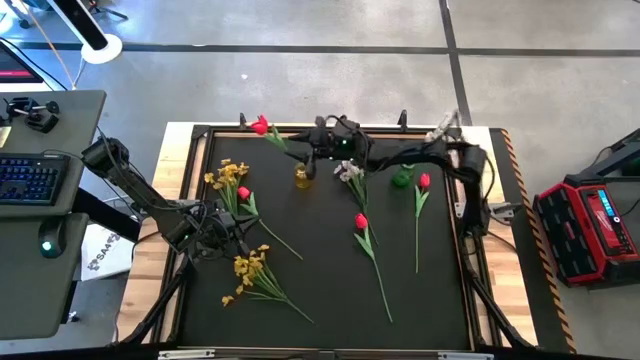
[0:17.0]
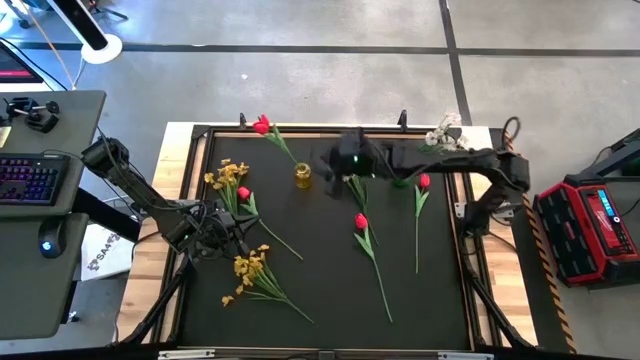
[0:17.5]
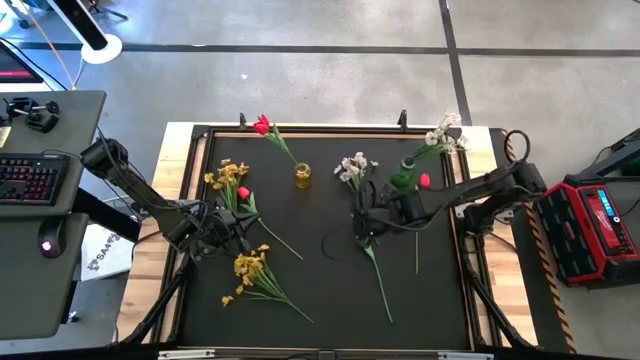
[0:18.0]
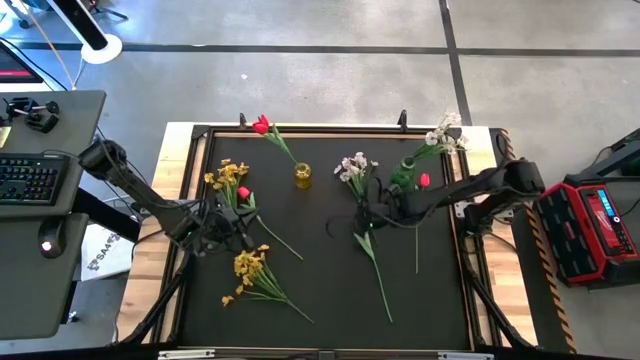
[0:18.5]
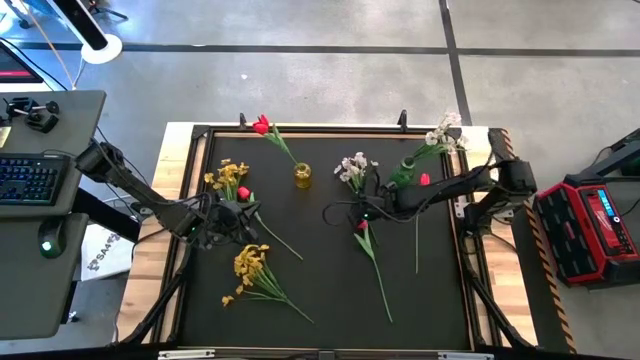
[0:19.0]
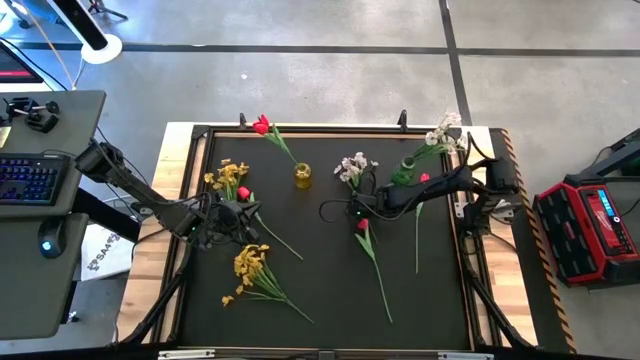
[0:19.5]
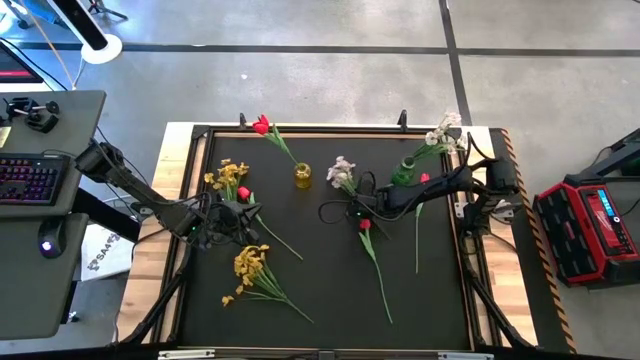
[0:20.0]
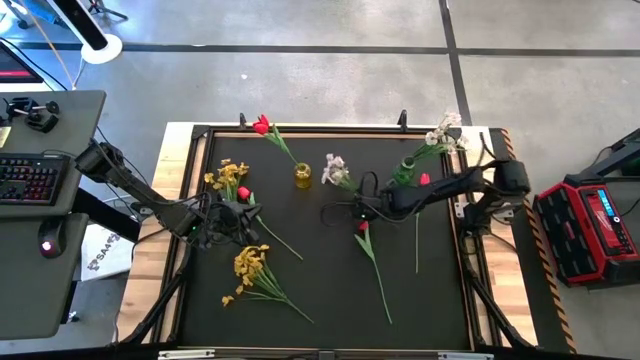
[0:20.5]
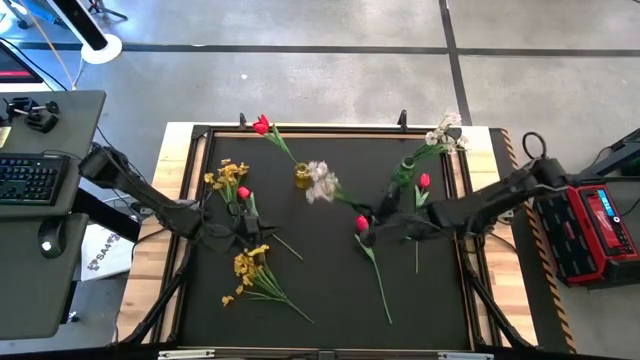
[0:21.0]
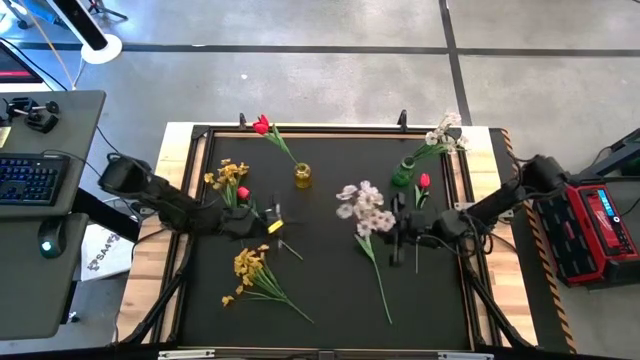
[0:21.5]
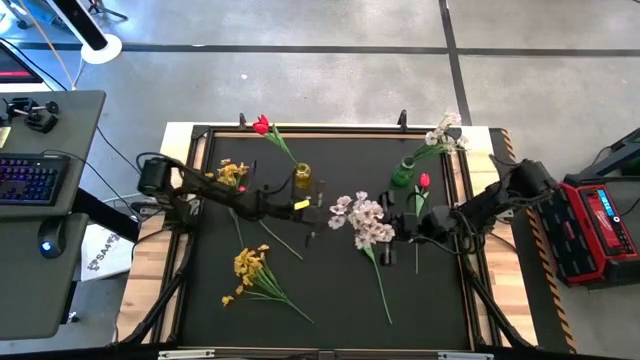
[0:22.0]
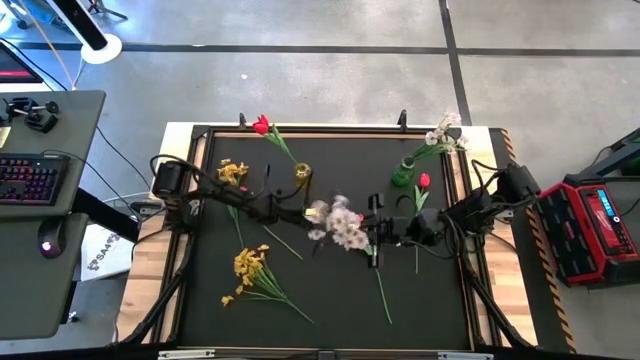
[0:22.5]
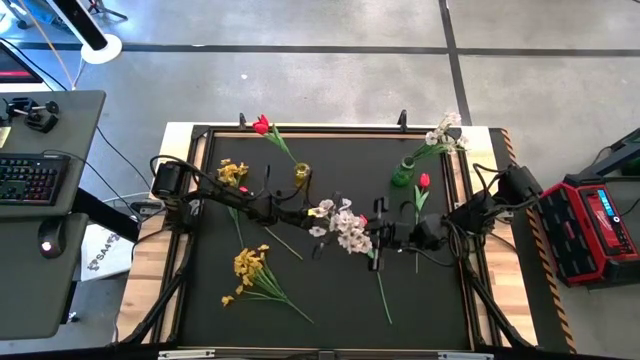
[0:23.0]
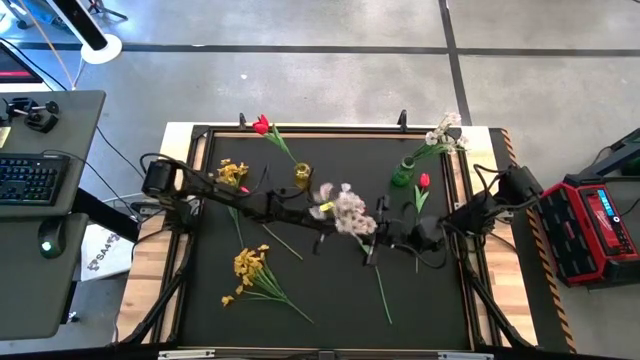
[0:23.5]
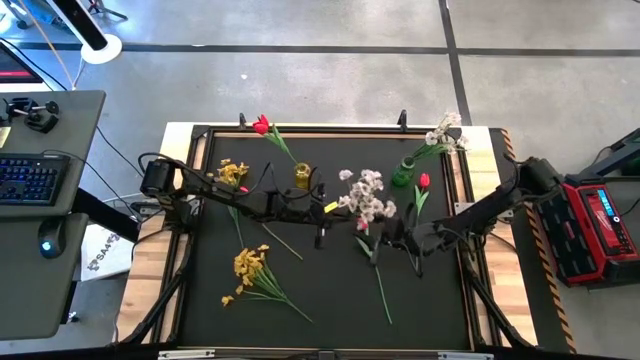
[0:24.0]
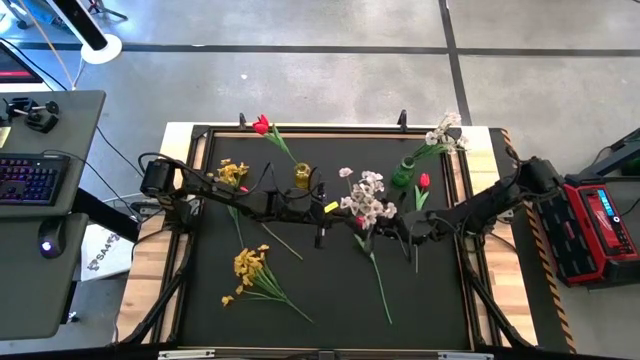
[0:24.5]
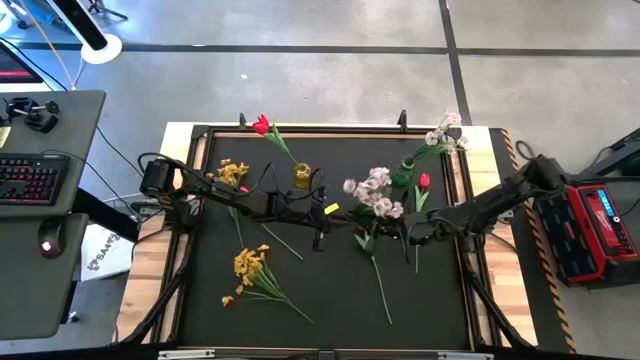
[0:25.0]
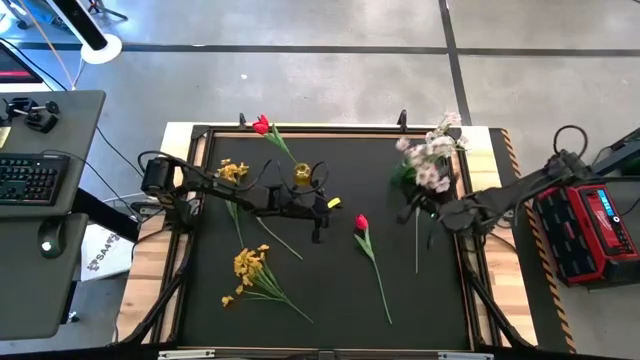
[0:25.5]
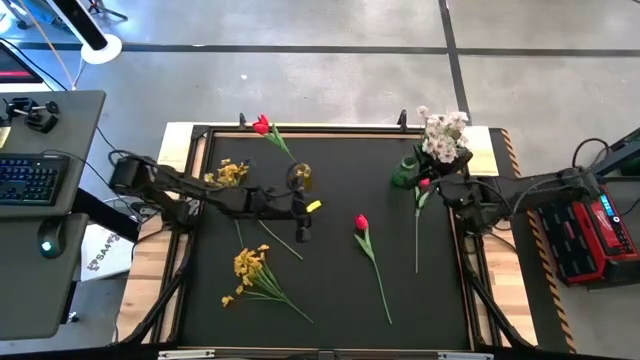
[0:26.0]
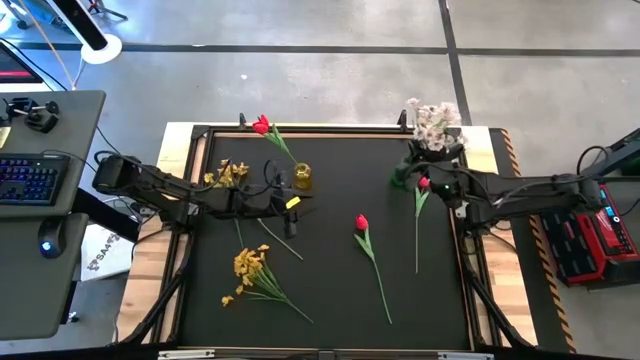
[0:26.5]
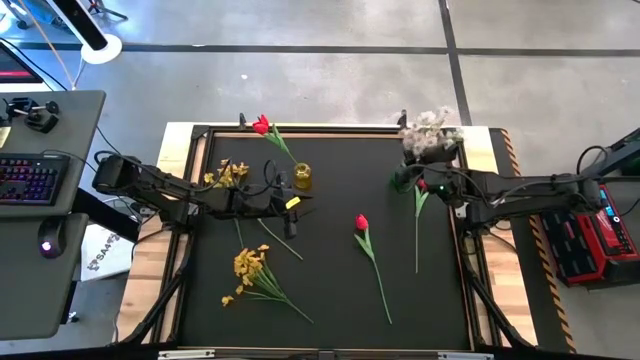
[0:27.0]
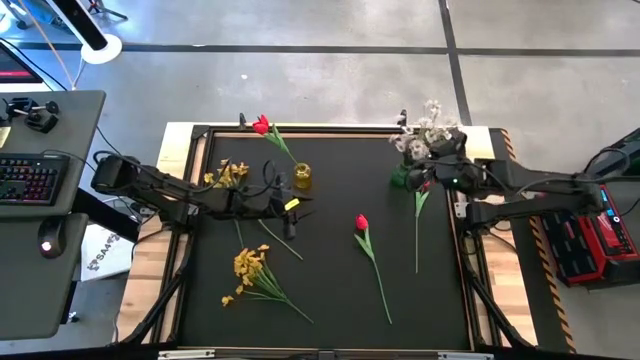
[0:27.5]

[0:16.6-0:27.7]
Task: Sort flowers into vase by color
Put the white flowers into the green vase

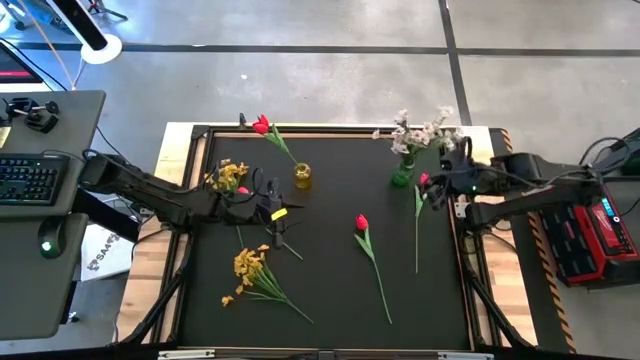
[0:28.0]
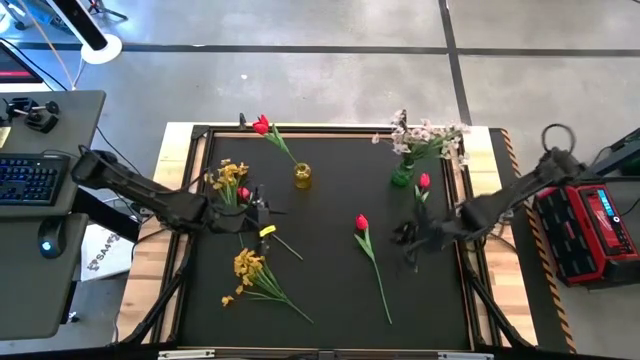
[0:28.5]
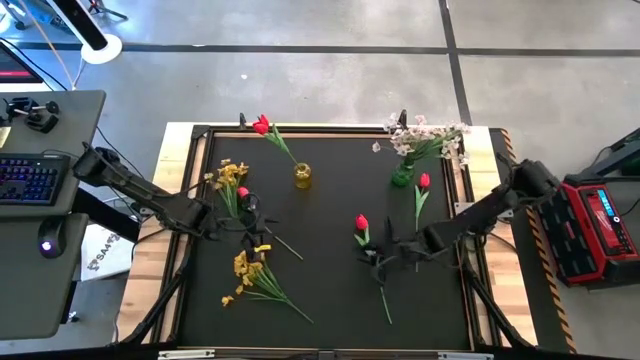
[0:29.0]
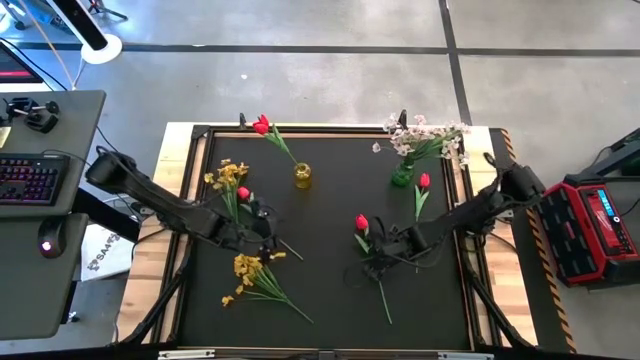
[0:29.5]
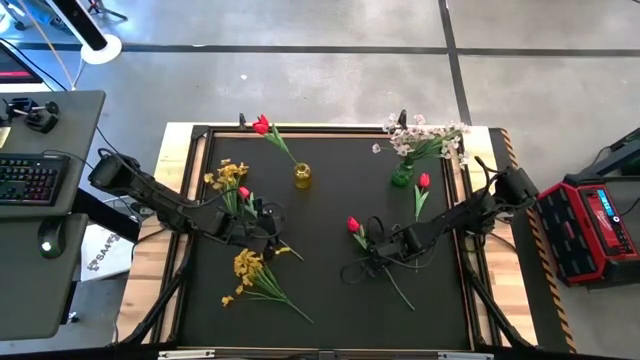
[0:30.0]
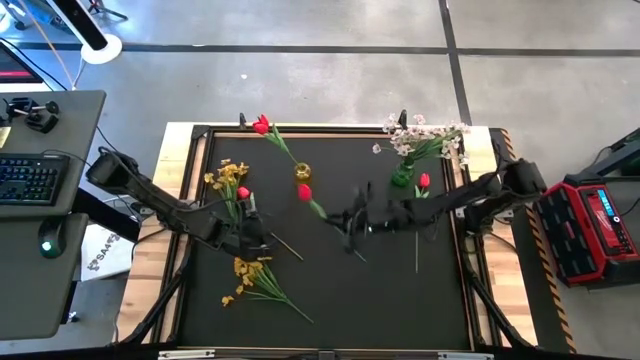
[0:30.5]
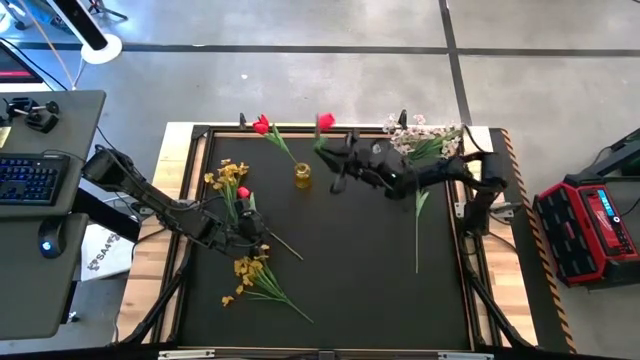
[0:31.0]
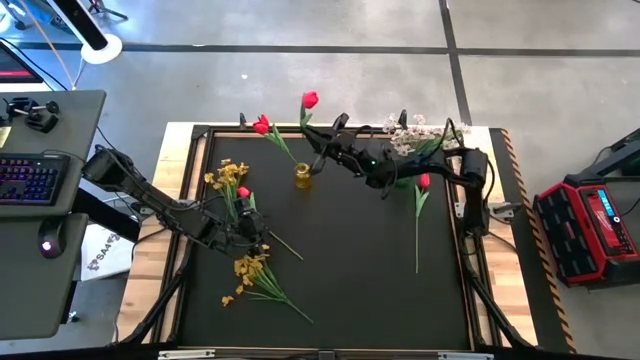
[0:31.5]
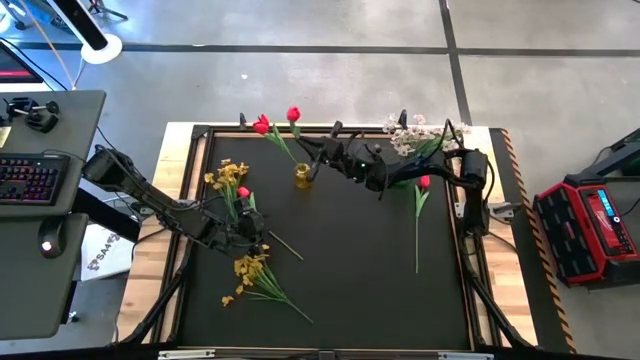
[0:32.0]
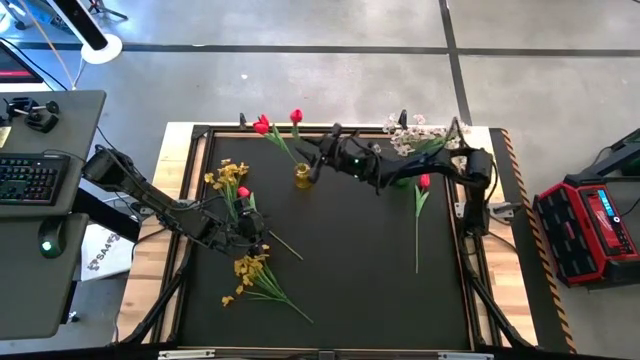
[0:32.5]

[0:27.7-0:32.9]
Put the red tulip into the yellow vase

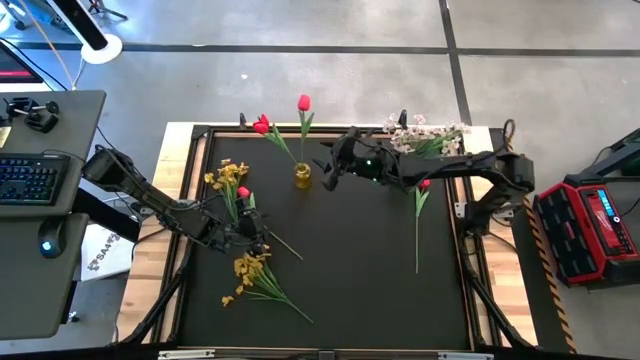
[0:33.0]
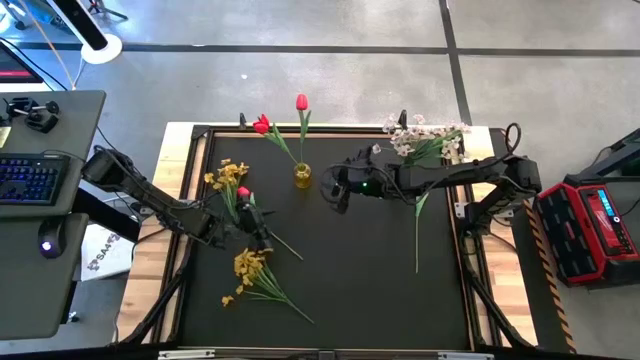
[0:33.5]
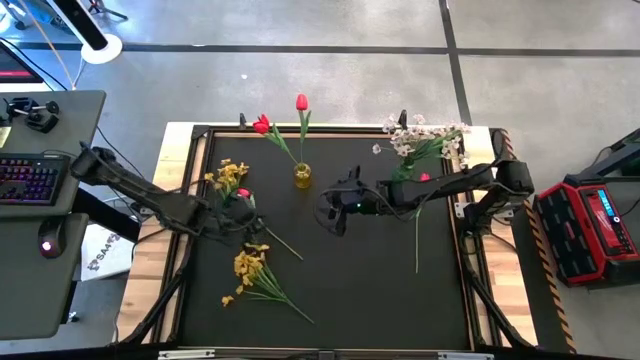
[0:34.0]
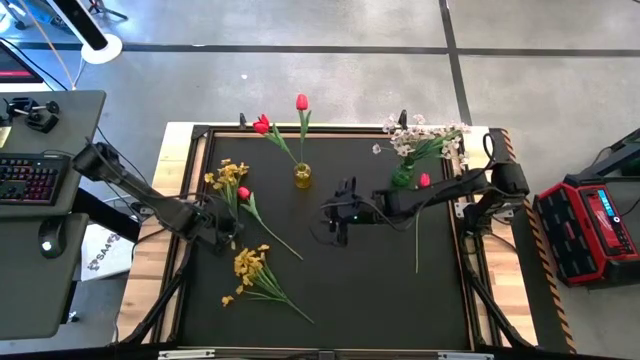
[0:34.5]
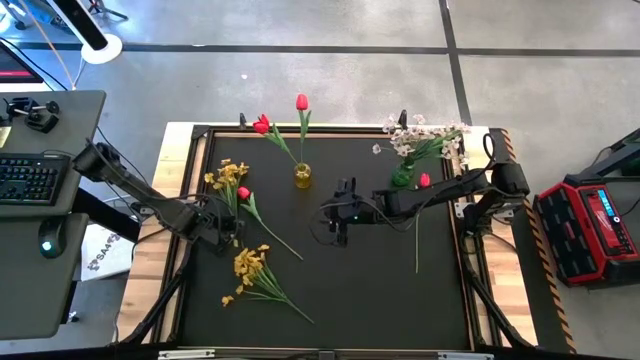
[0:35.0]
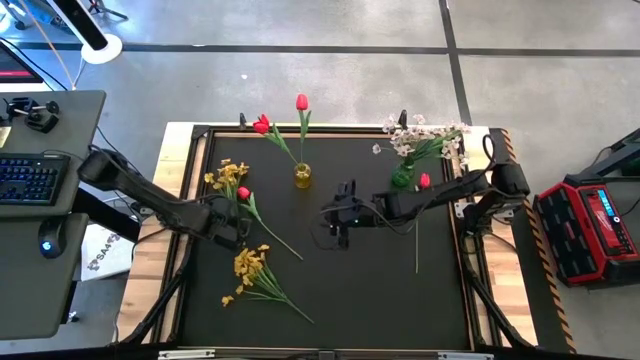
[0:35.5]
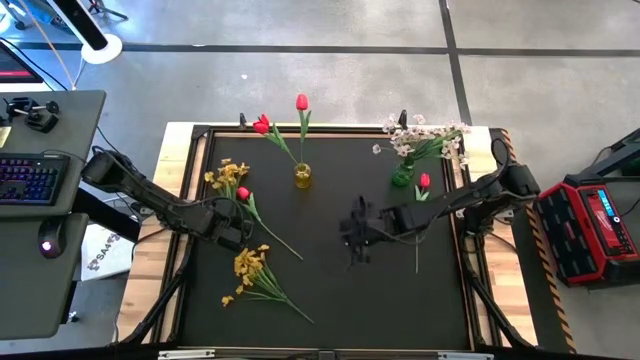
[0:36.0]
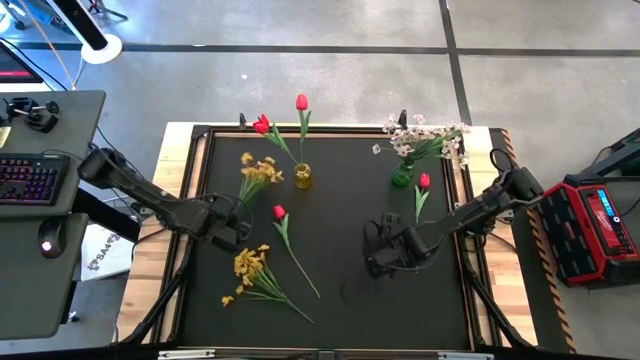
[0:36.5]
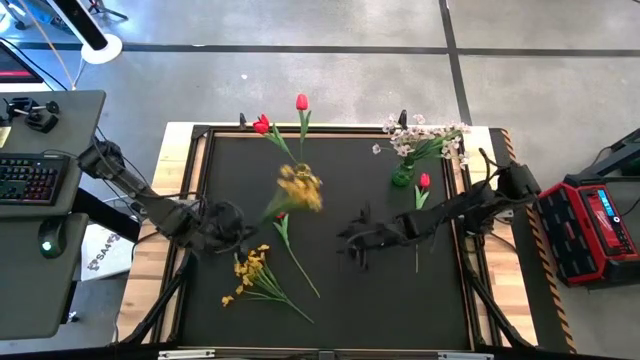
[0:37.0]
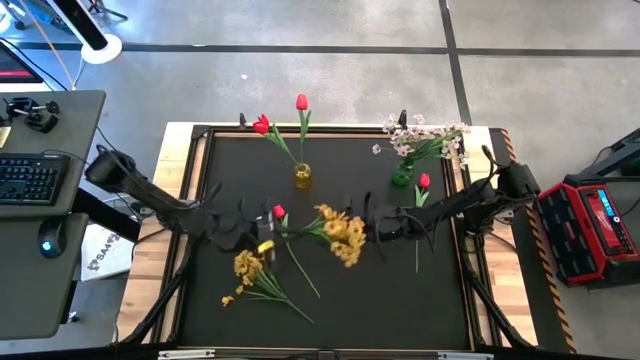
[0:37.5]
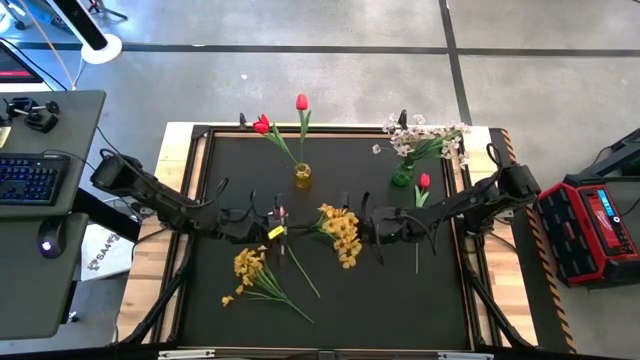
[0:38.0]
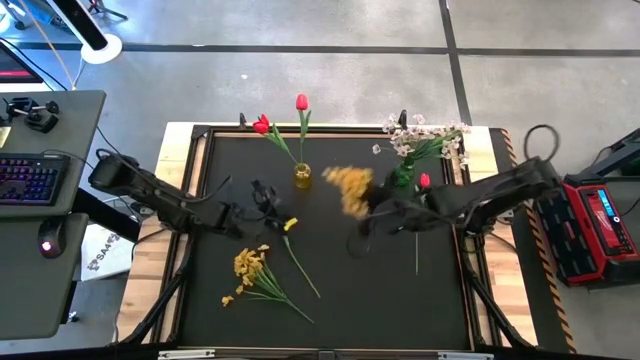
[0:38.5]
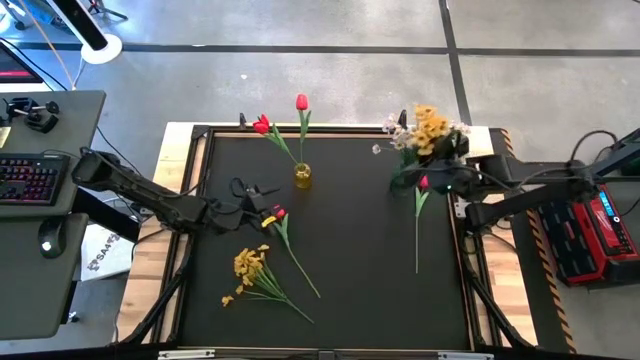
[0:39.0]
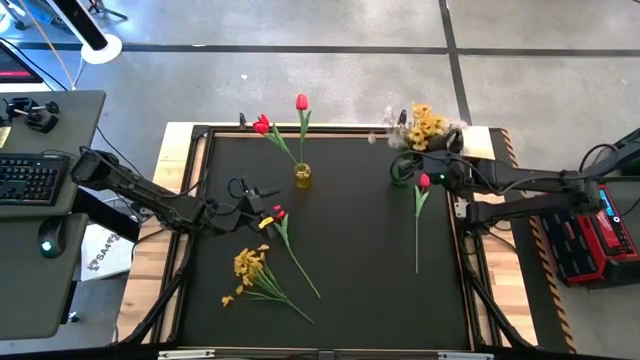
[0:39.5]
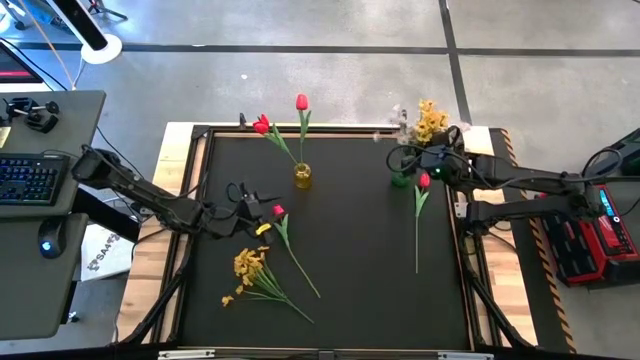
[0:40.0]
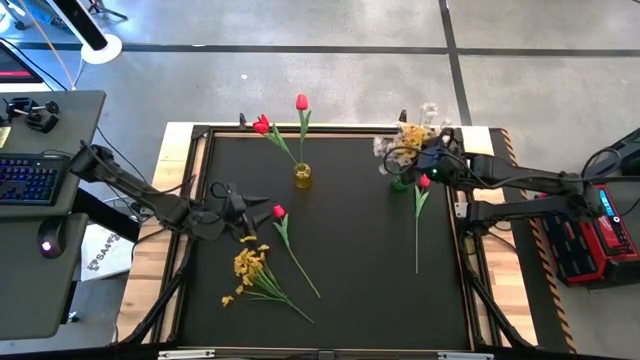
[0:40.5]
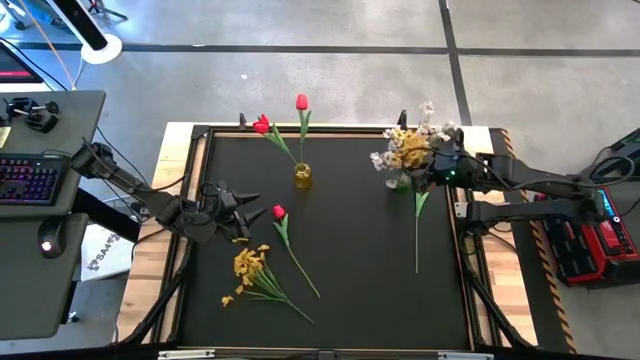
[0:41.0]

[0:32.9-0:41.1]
Put the yellow flowers into the green vase
